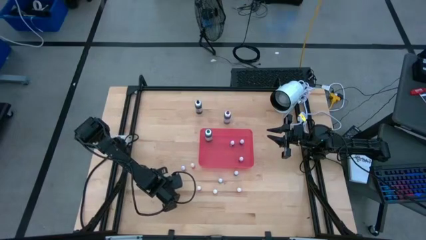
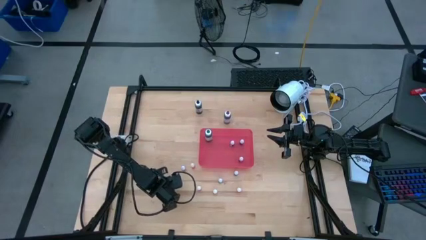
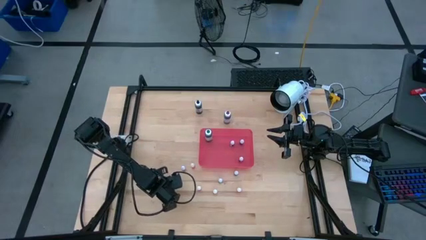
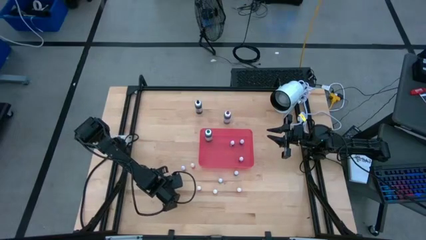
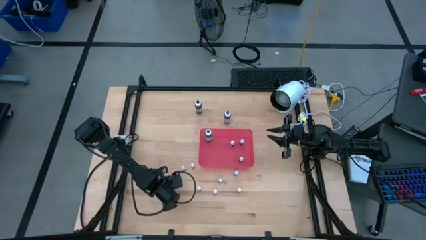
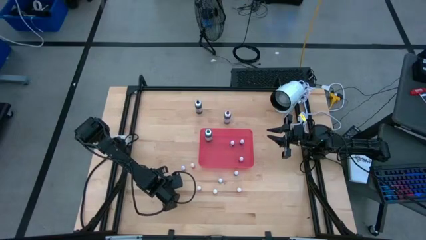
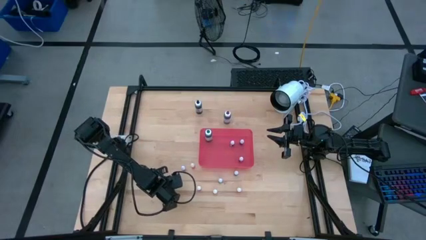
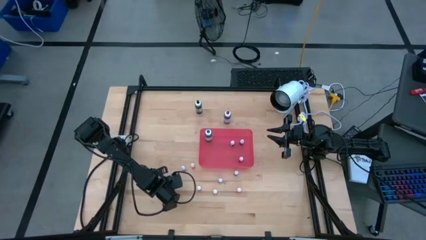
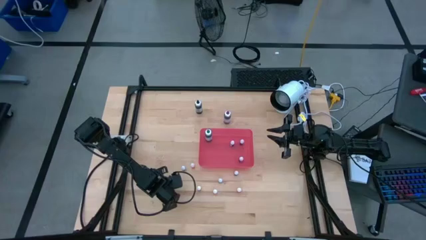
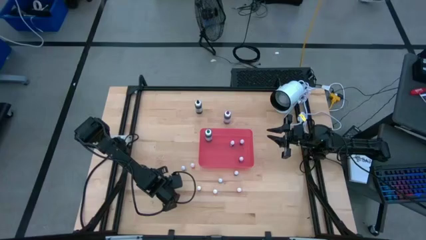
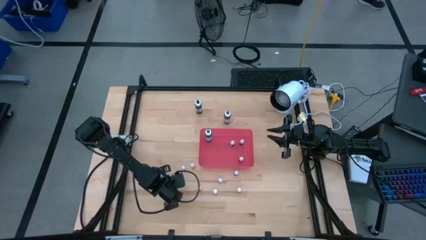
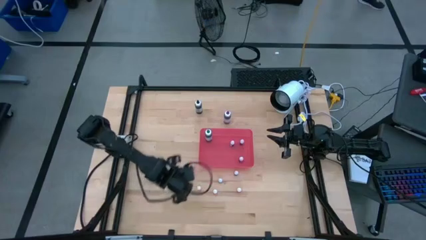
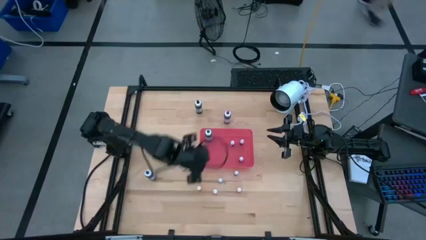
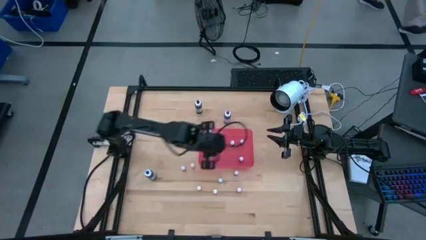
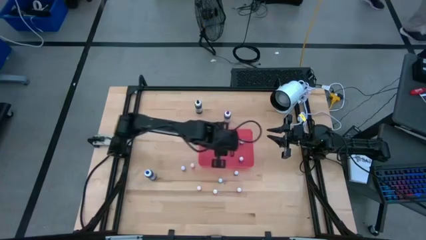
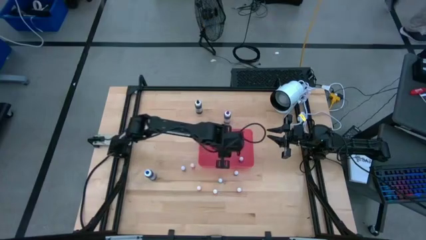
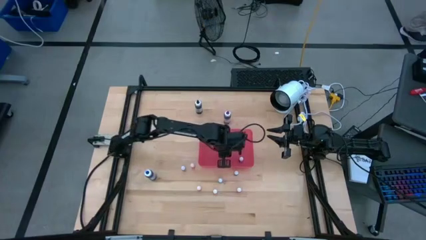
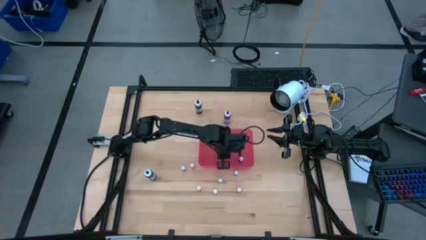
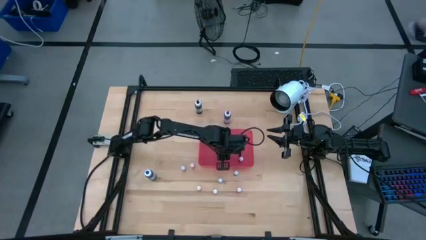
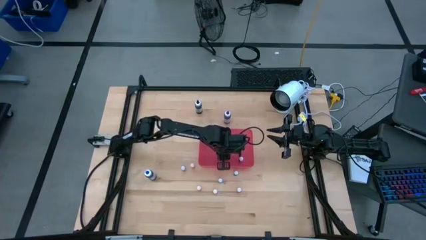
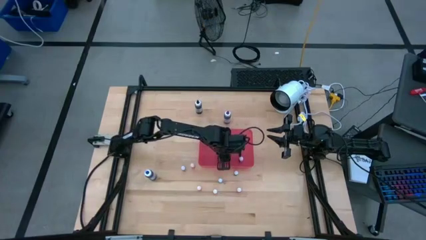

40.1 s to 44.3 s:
Task: Pick & Place food coloring
Put the small black food coloring bottle into the red bin

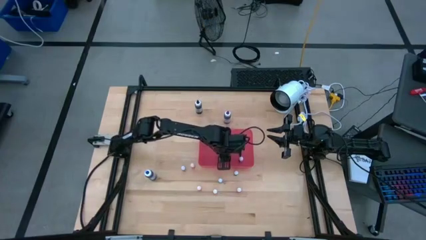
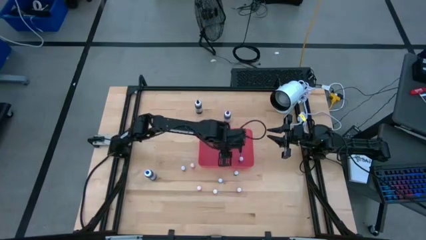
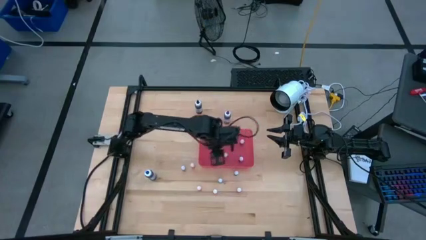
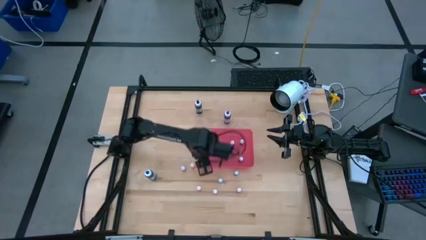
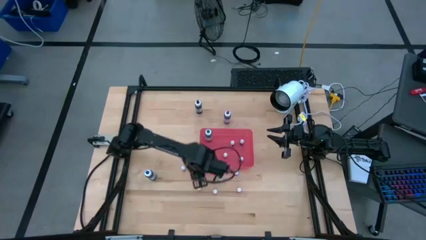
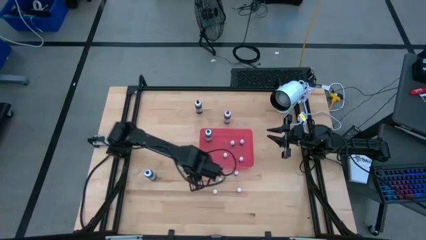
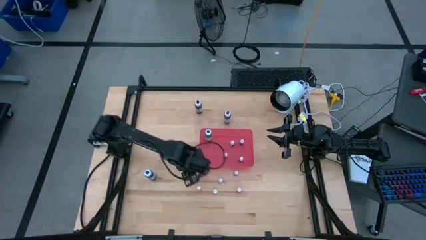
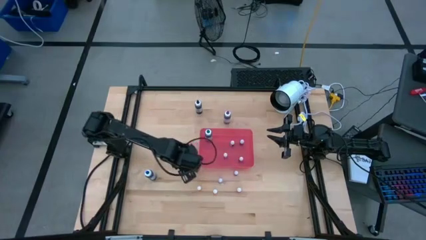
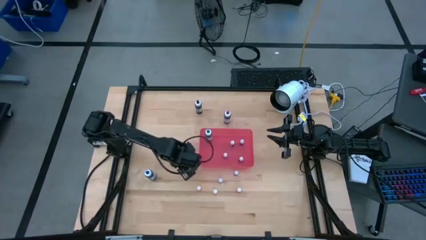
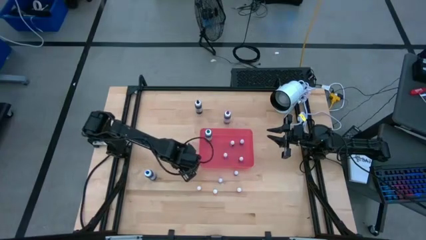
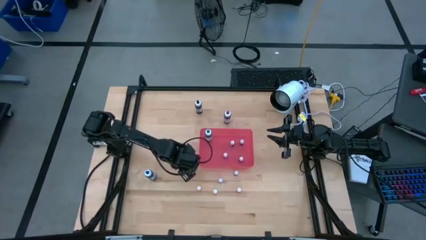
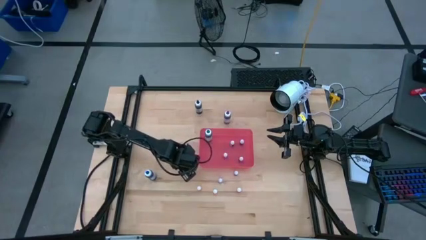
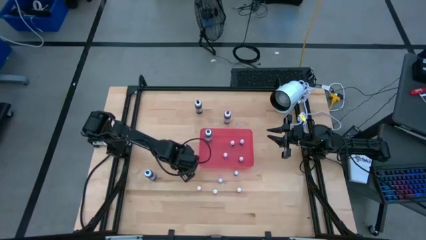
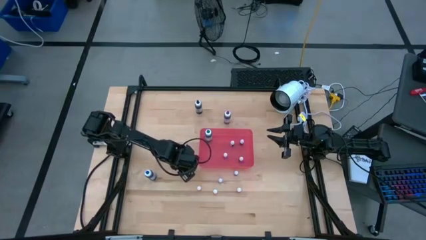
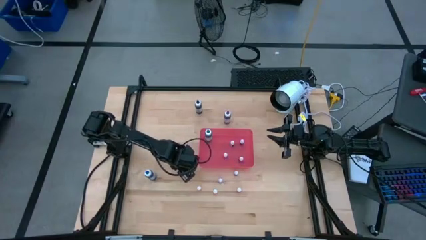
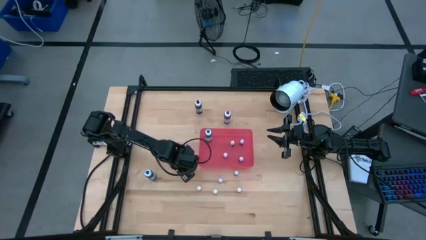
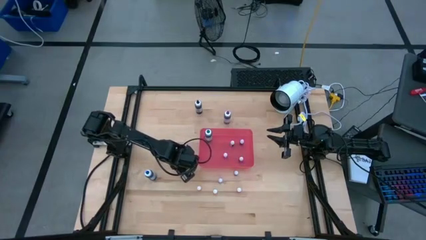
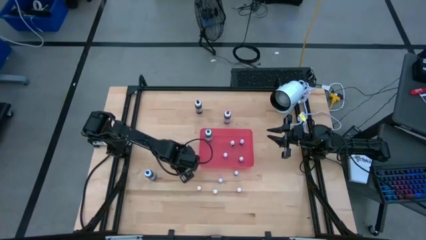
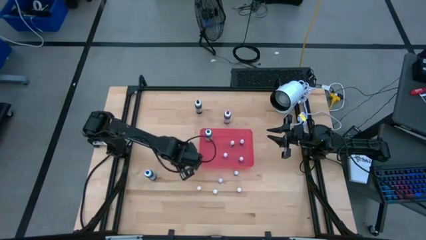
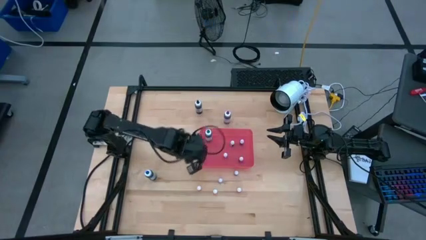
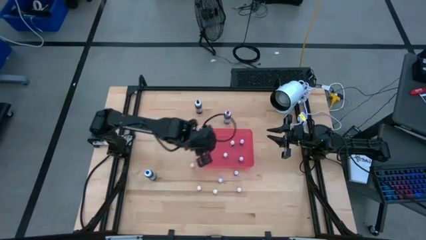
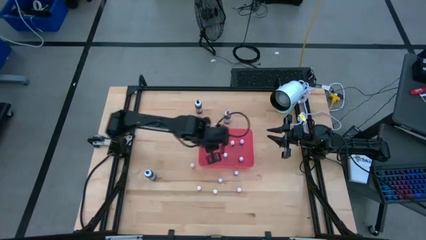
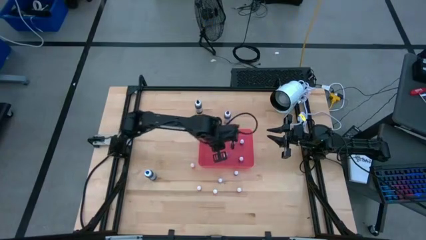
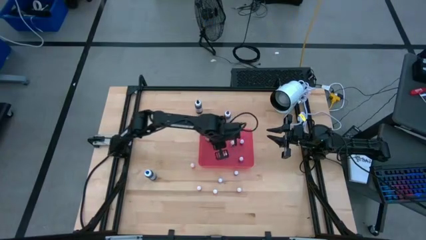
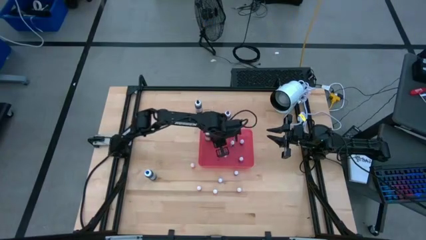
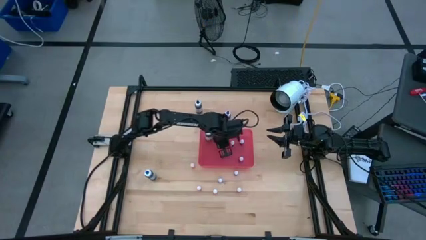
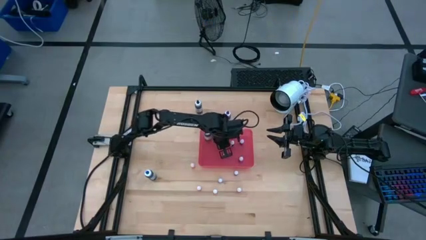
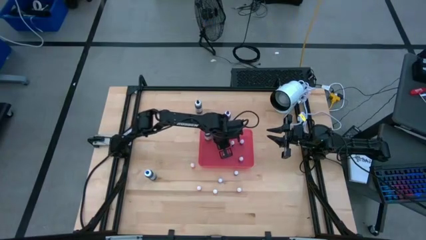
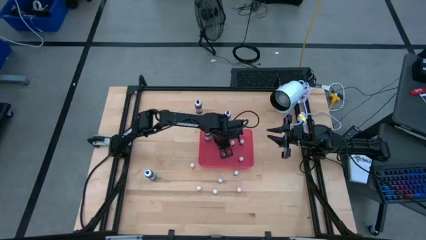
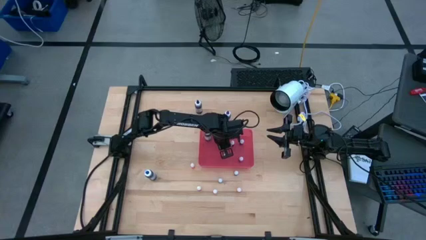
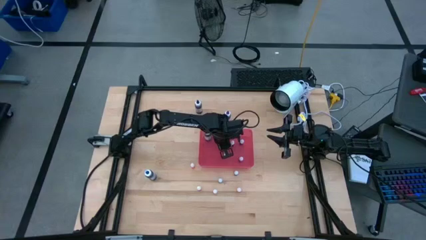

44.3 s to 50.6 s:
Put the small red food coloring bottle into the red bin

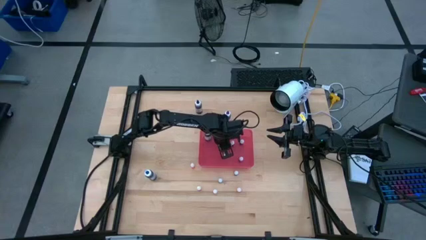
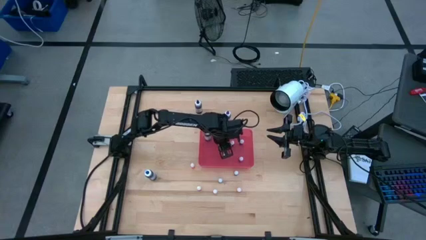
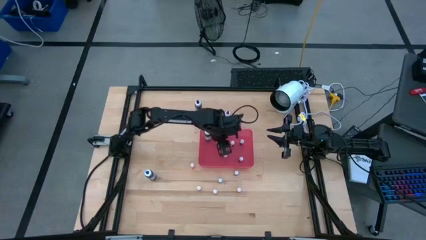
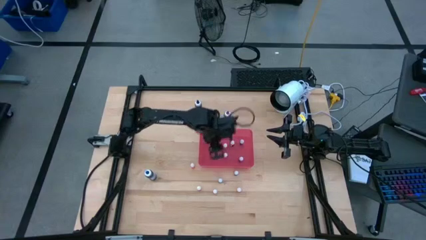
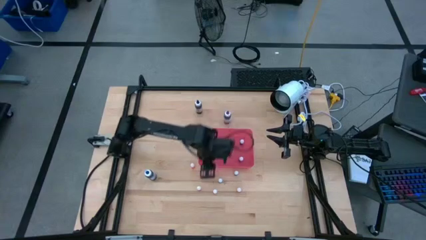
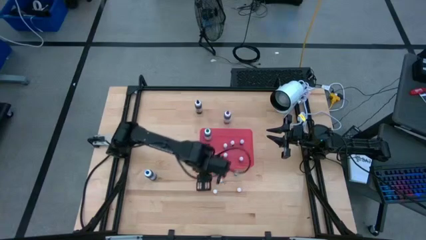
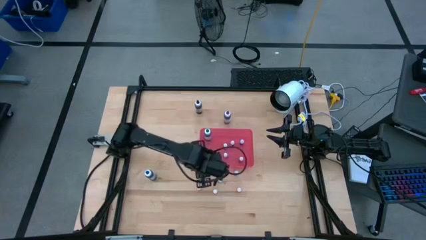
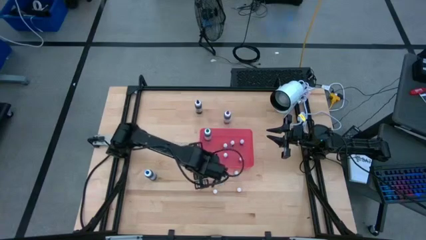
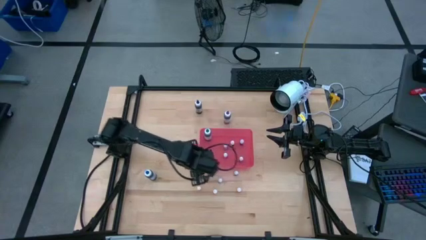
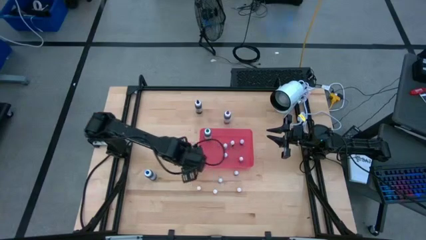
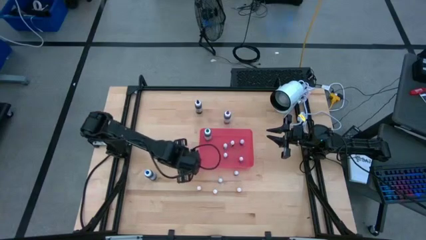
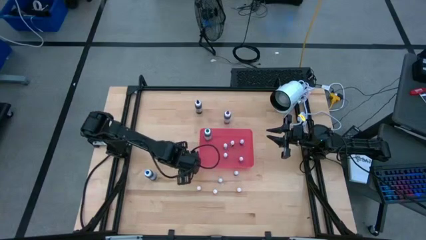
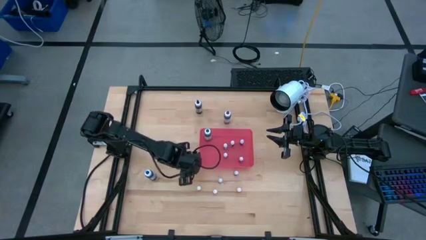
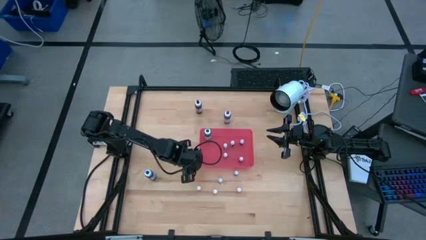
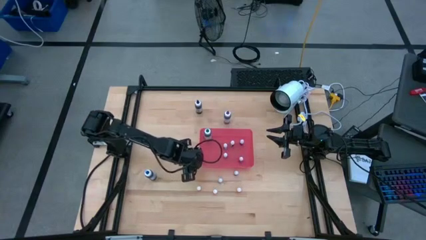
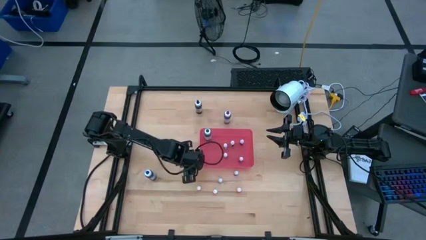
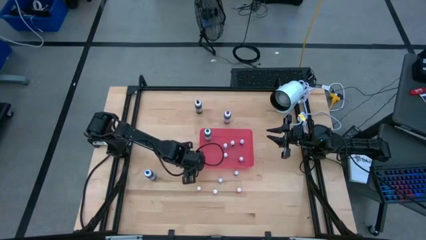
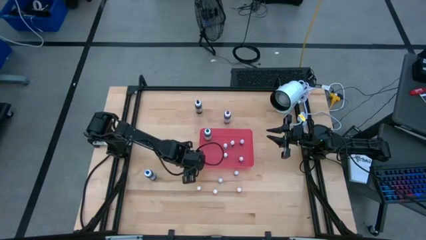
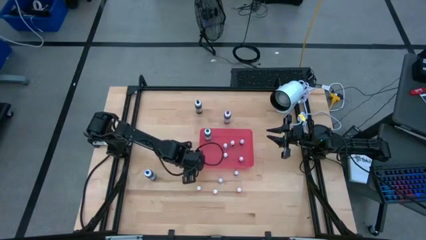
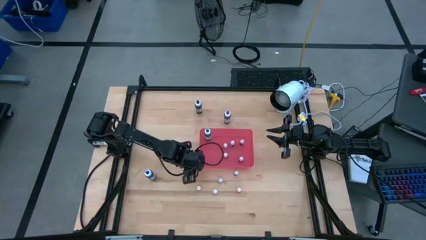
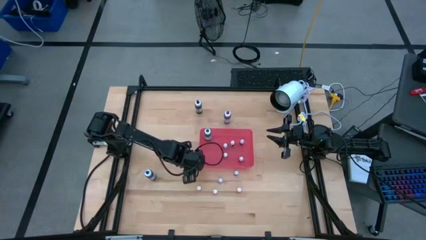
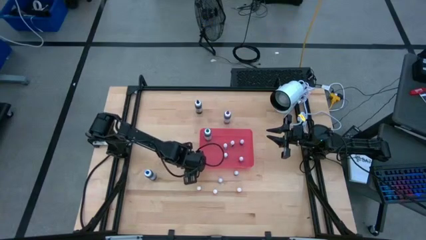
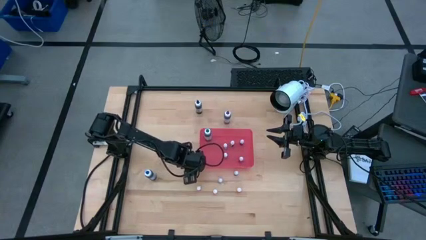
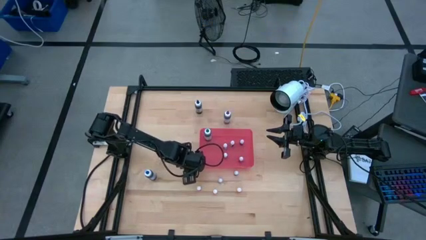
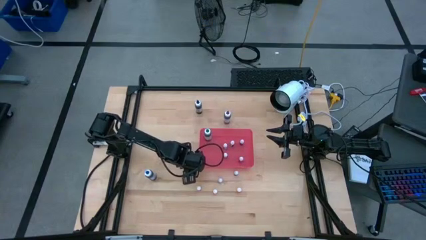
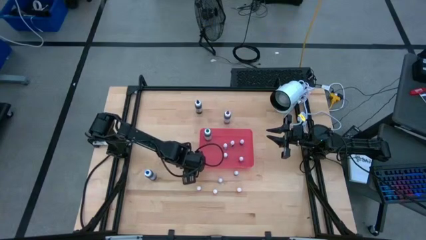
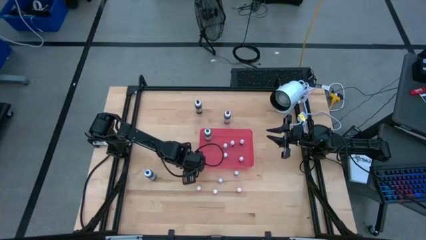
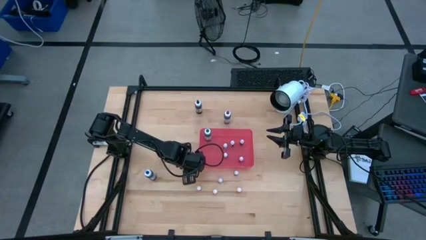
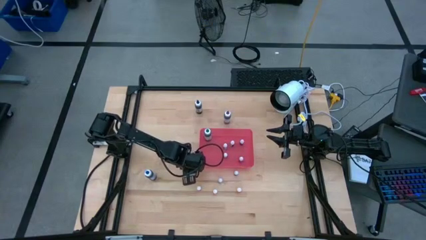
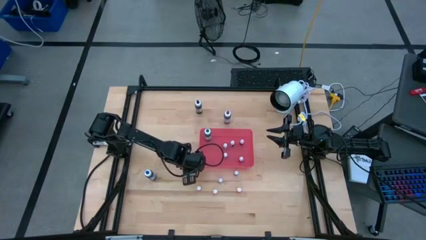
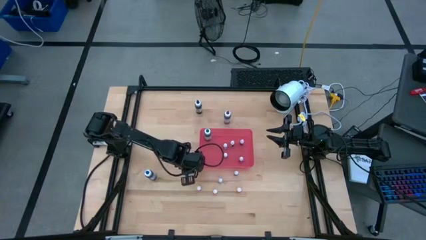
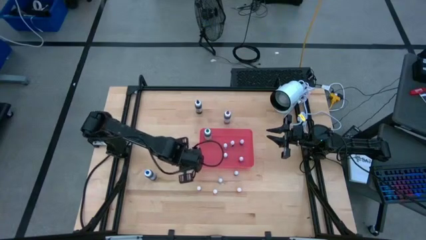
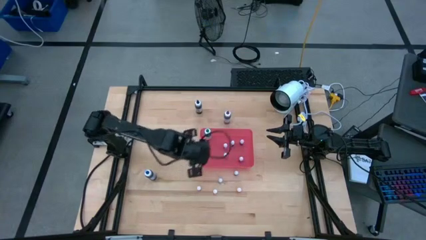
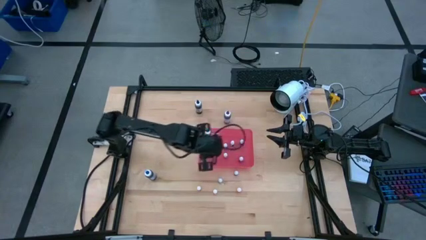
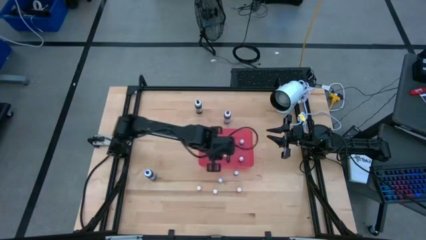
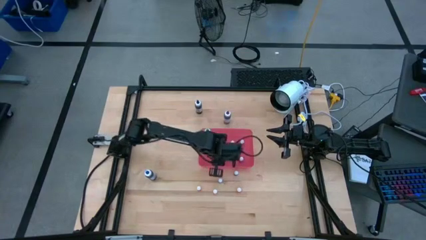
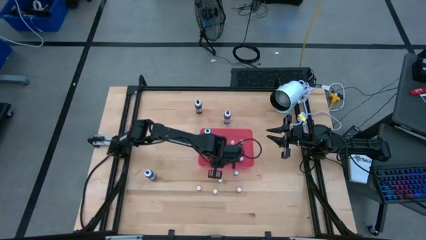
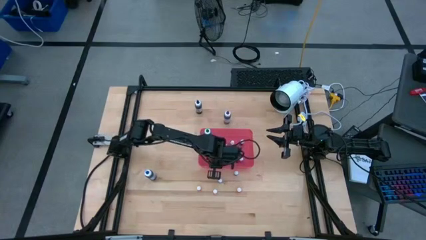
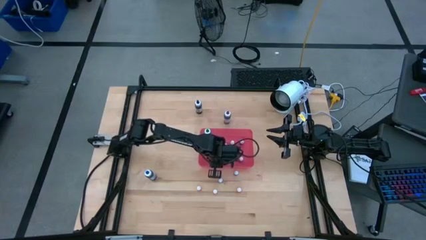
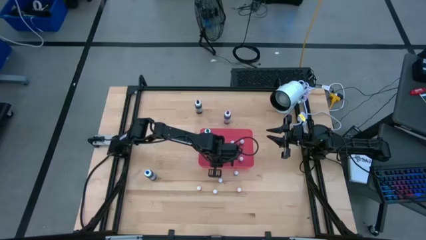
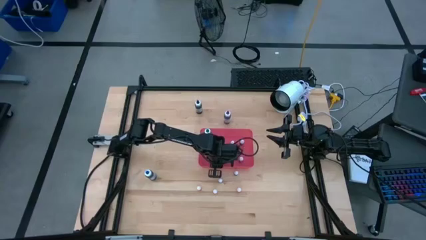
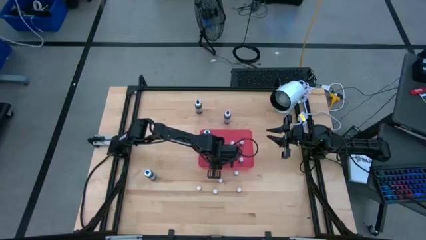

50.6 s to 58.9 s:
Put the small yellow food coloring bottle into the red bin
